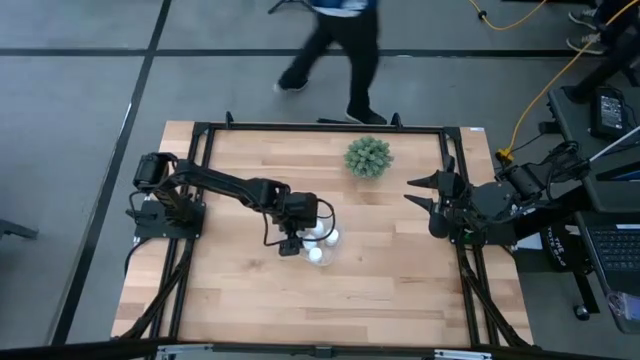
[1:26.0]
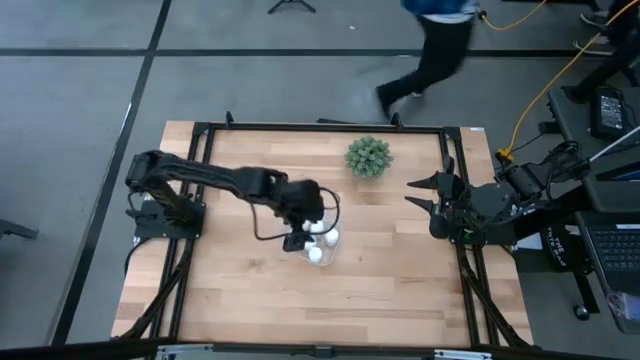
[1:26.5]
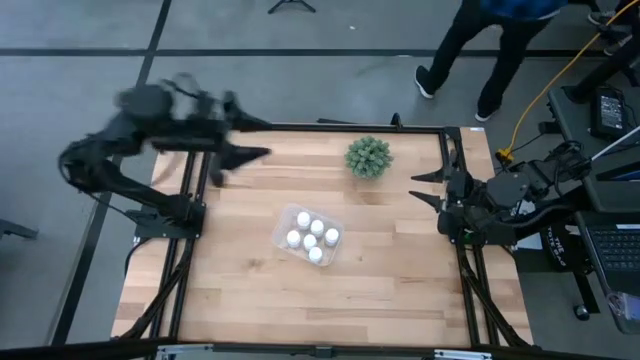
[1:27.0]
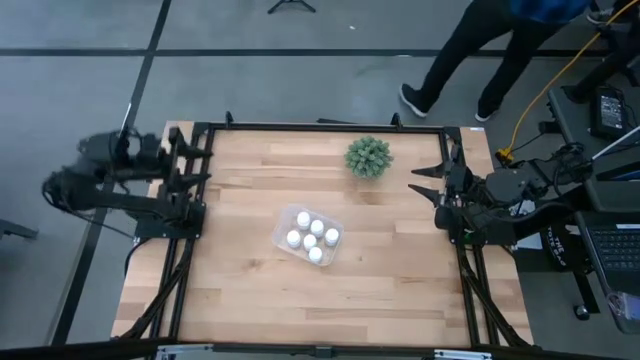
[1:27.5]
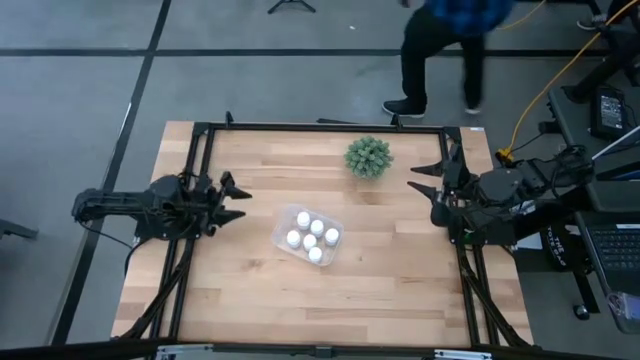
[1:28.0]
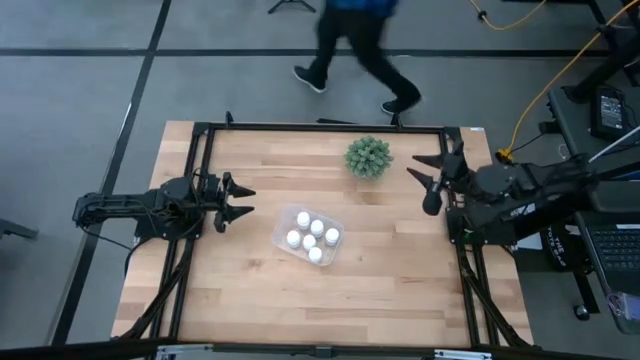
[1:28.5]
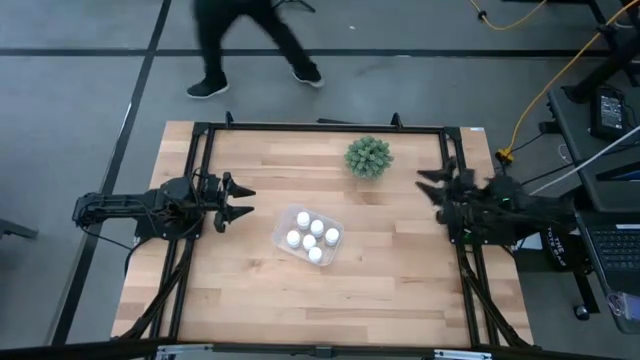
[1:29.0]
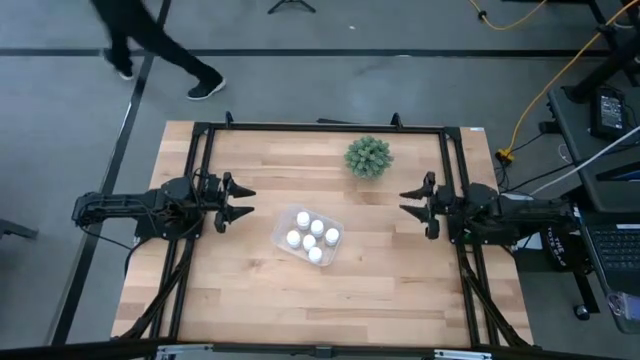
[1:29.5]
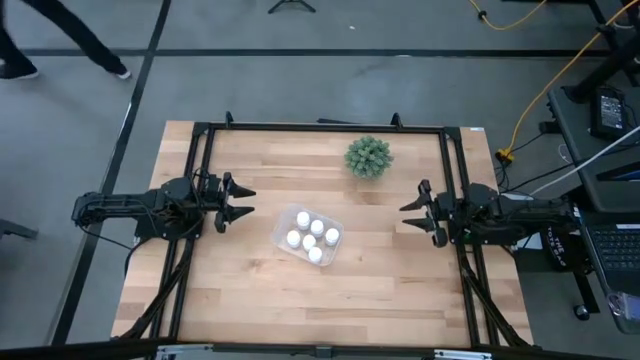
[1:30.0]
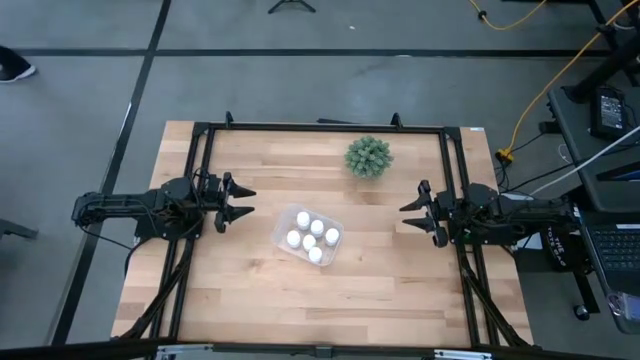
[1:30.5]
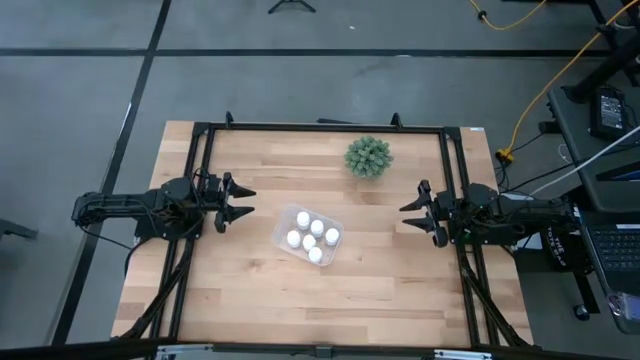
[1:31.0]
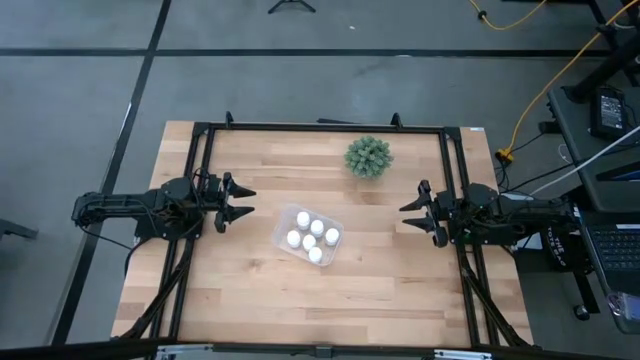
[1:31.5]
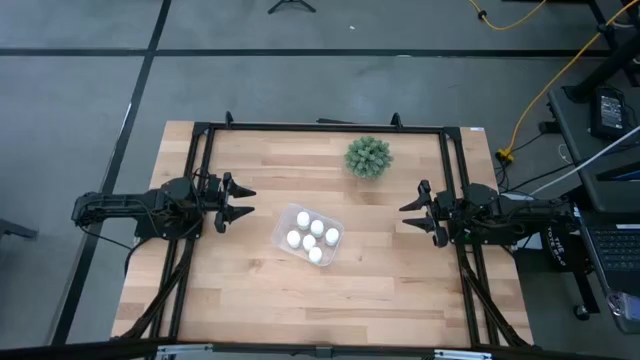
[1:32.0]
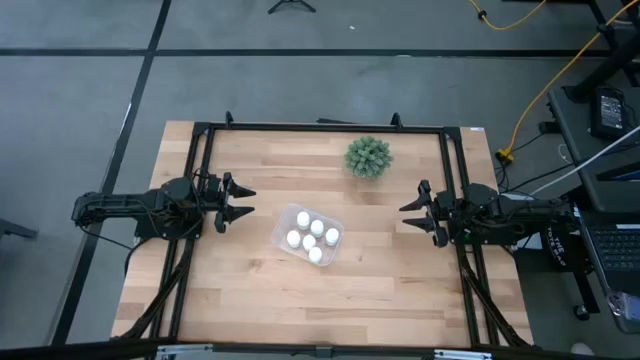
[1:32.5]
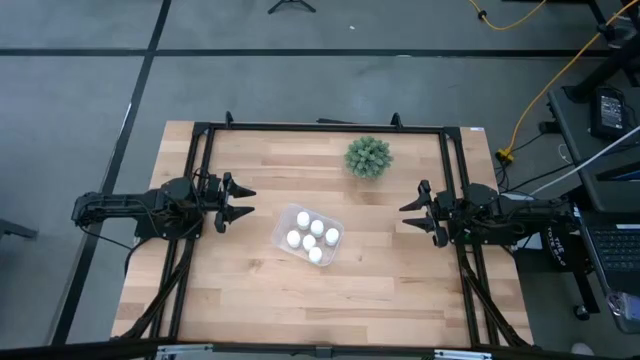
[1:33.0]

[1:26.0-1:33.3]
Task: Pick and place pill bottles into a basket
Return to Home Position

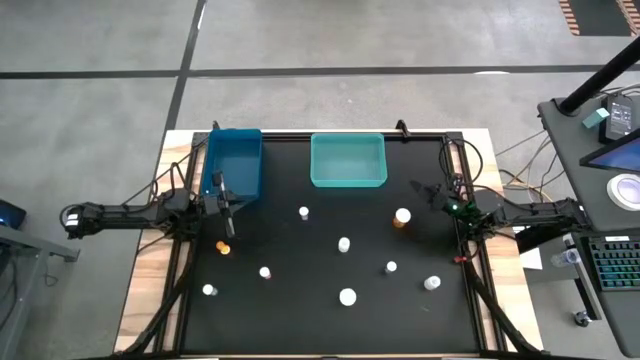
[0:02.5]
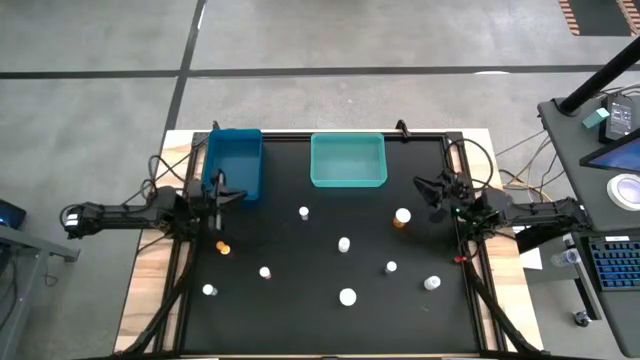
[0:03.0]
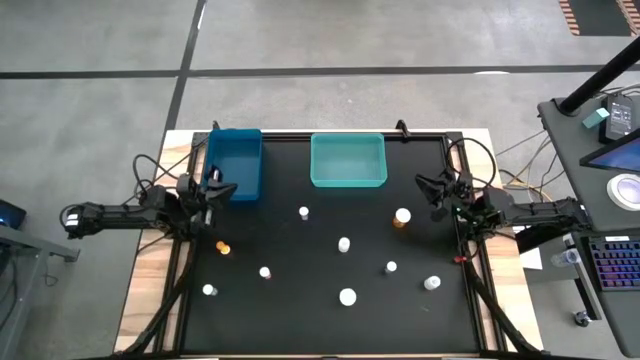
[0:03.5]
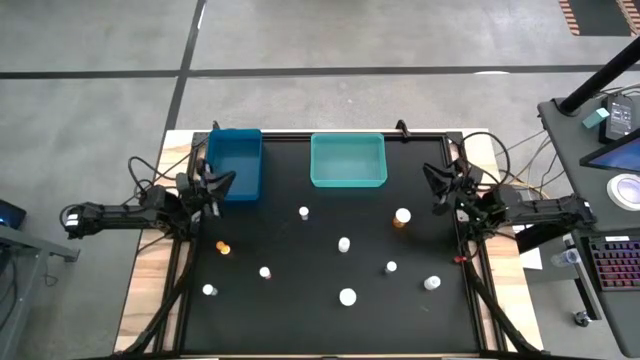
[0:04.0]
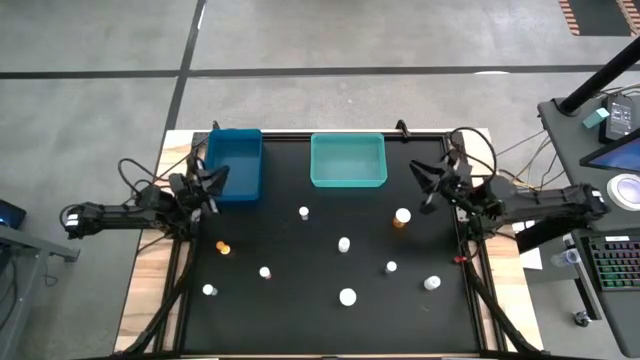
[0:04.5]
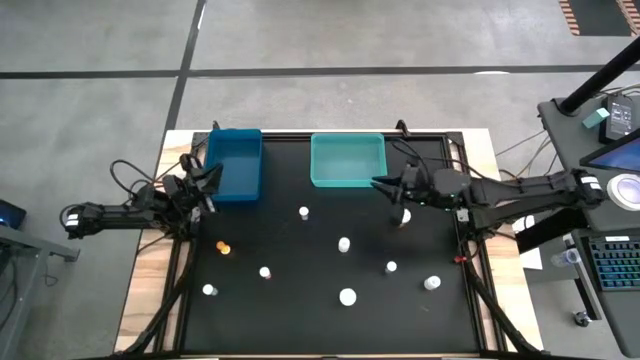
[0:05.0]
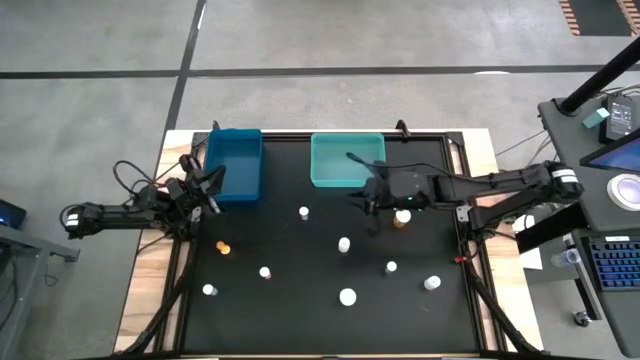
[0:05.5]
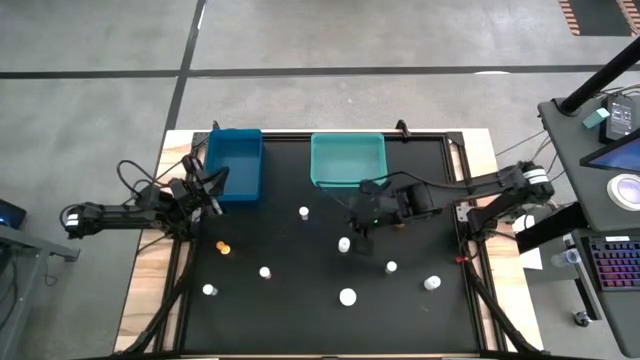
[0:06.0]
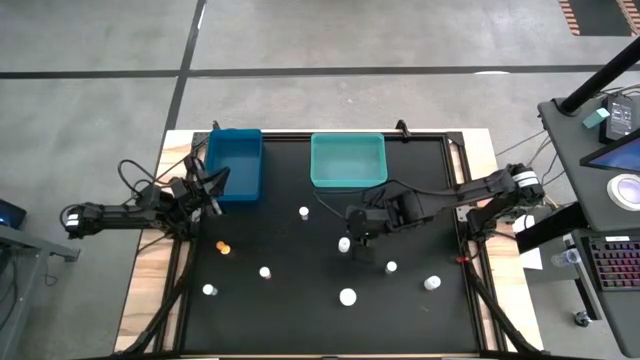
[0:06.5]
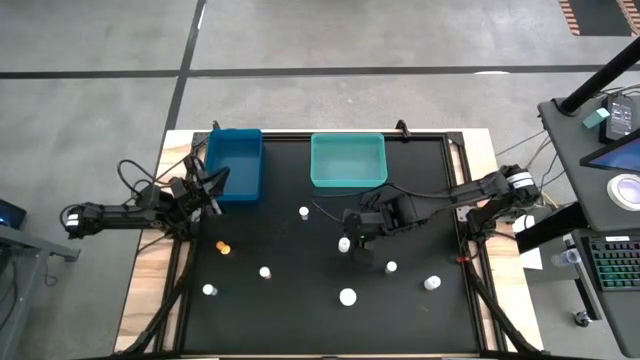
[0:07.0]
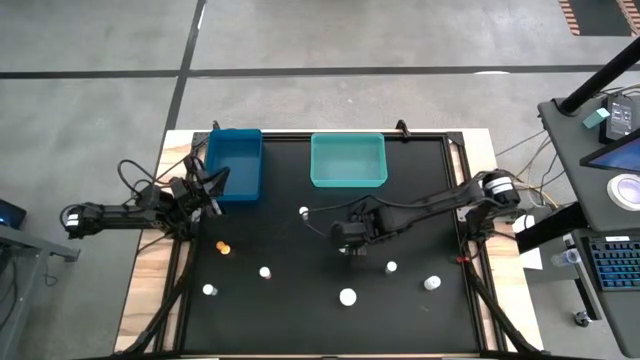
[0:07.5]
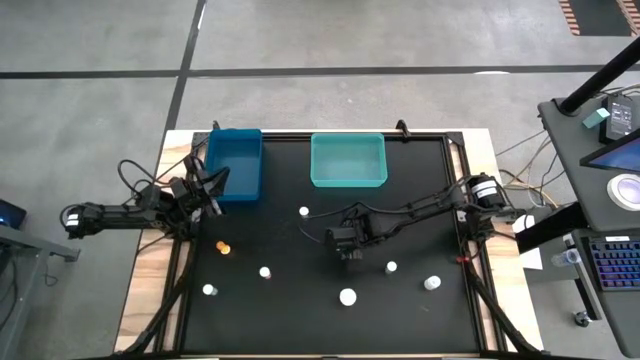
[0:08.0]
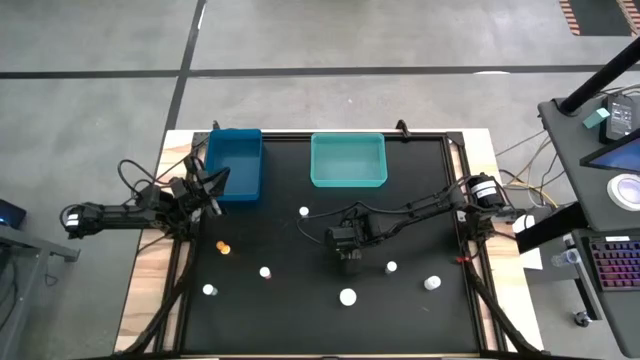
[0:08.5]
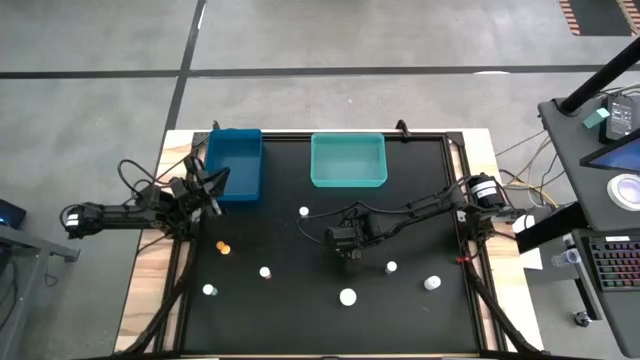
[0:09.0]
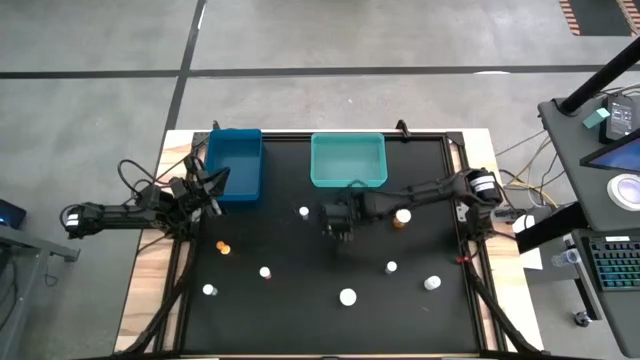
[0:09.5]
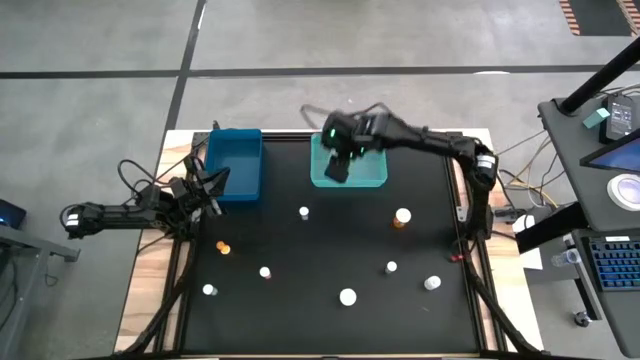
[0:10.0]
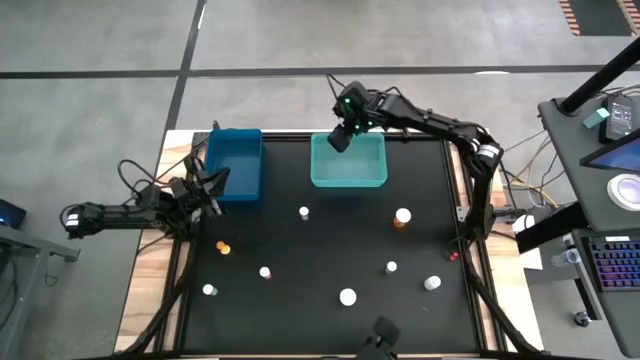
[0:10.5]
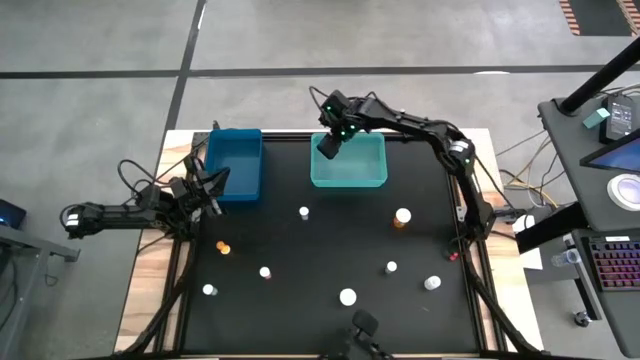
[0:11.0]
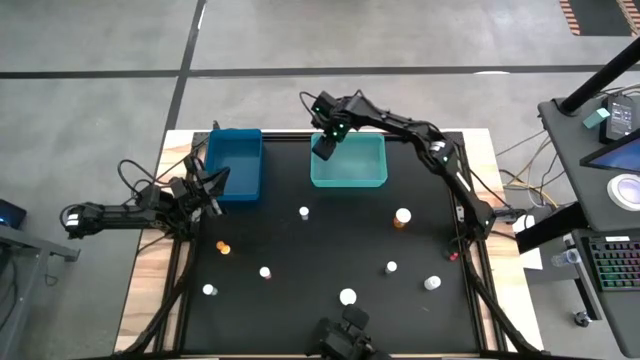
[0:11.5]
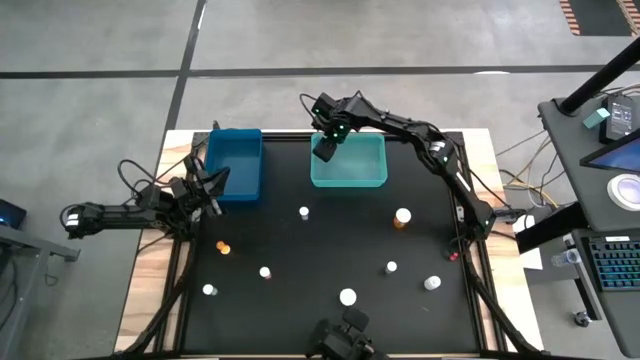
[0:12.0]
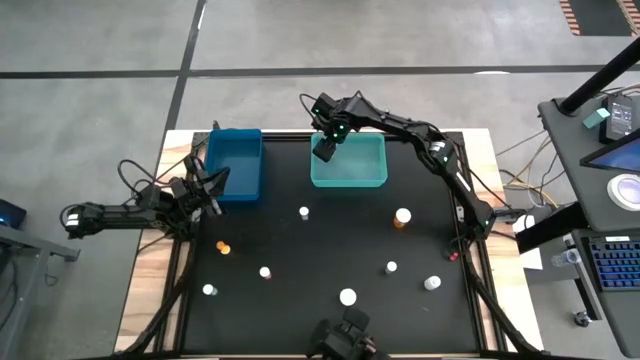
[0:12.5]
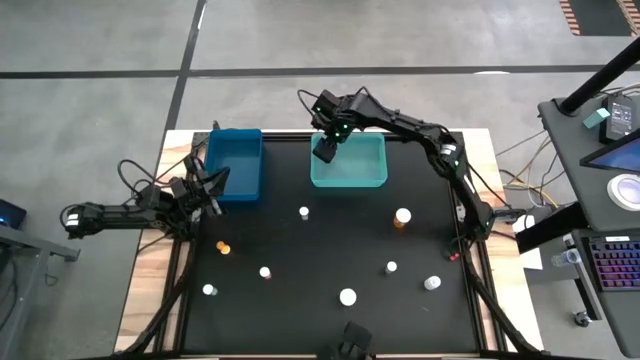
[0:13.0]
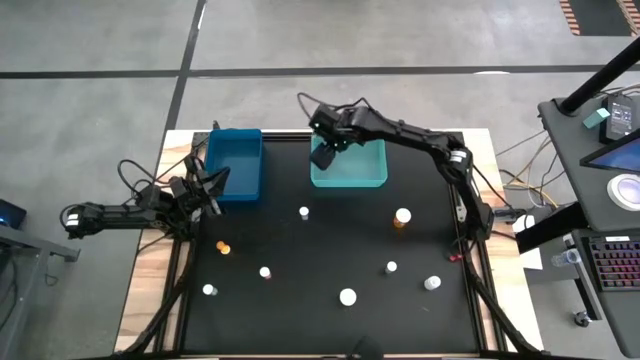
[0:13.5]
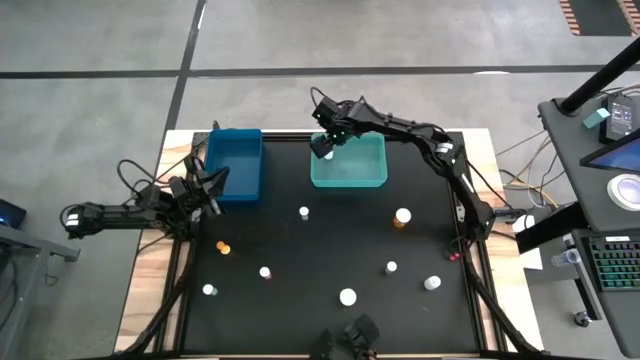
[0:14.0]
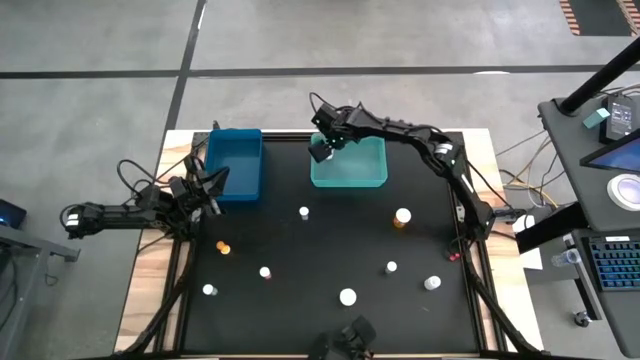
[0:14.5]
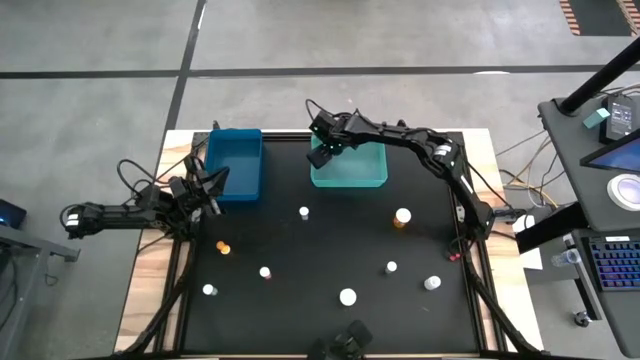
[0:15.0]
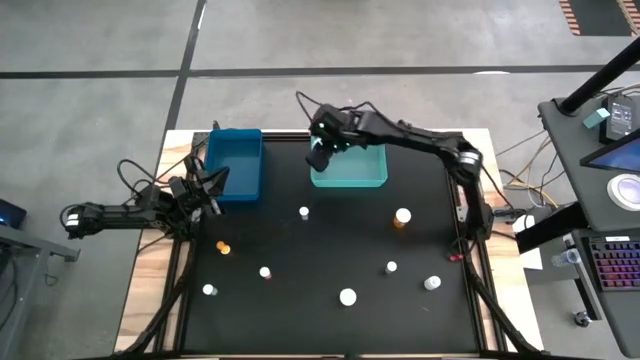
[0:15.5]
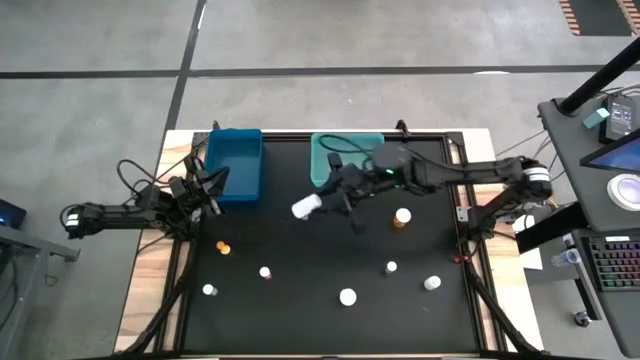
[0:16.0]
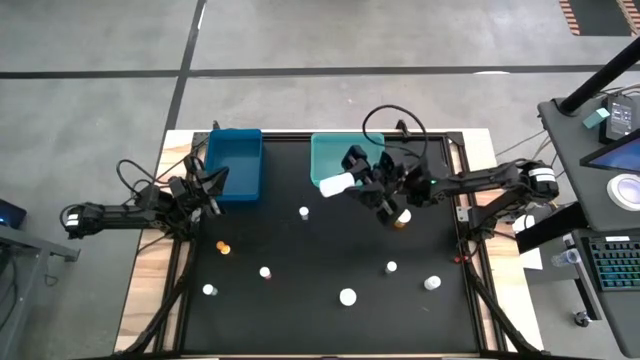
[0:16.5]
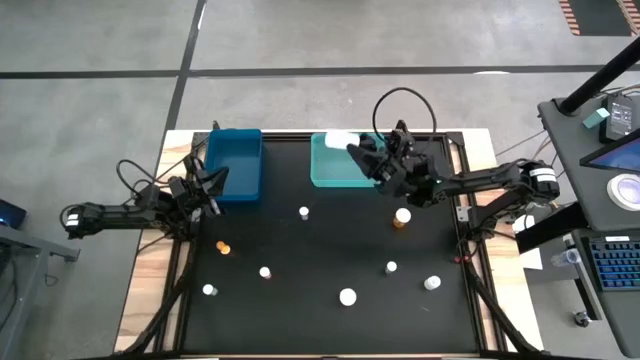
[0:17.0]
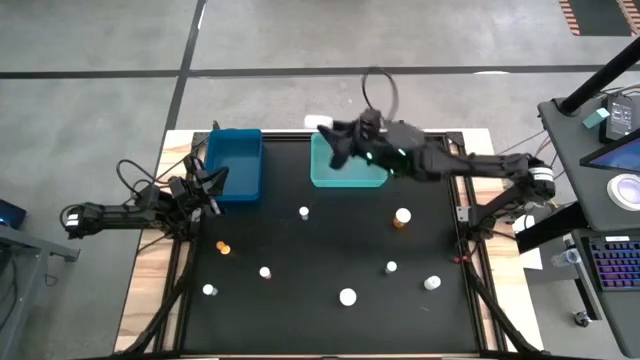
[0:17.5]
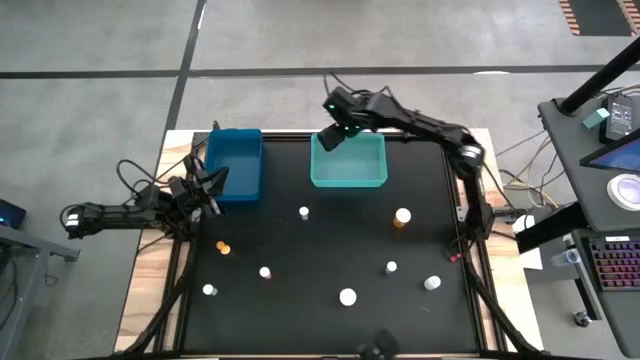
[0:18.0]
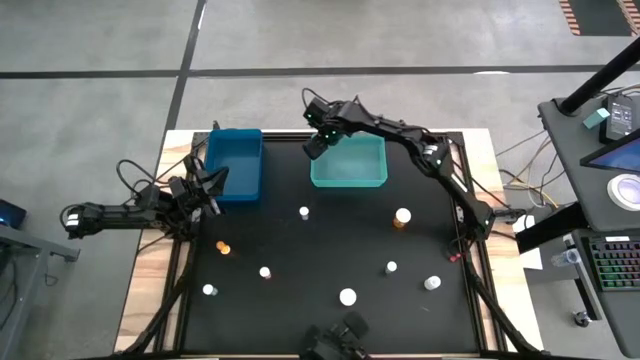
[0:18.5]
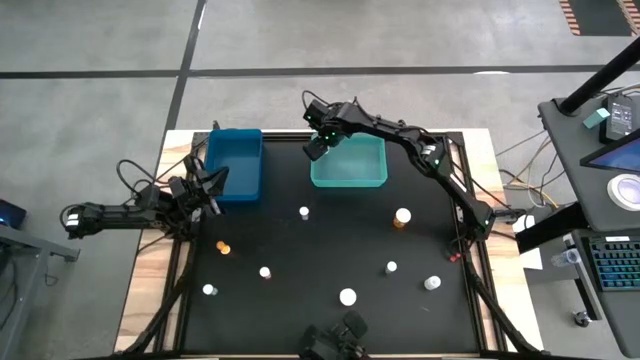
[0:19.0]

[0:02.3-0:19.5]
Task: Pick and place medicine bottles into bin by pill shape (circle, oval)
Put the white tablet bottle into the light blue bin
